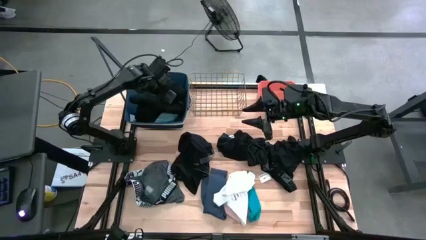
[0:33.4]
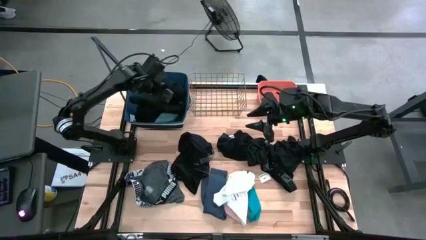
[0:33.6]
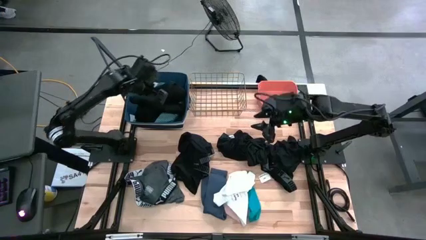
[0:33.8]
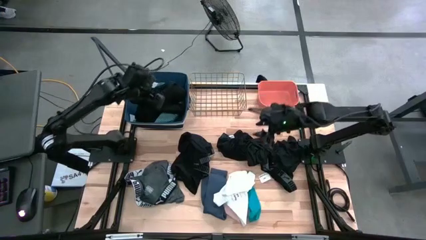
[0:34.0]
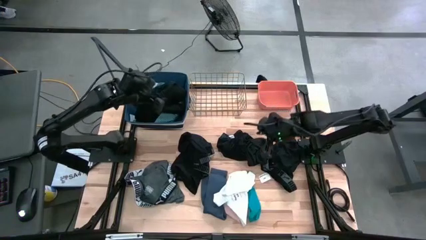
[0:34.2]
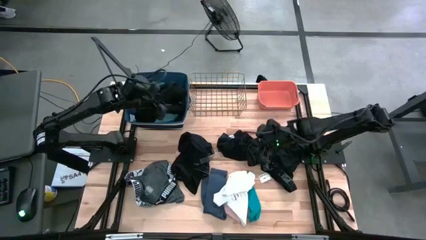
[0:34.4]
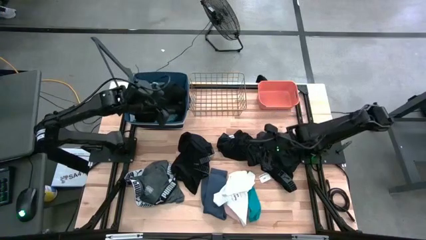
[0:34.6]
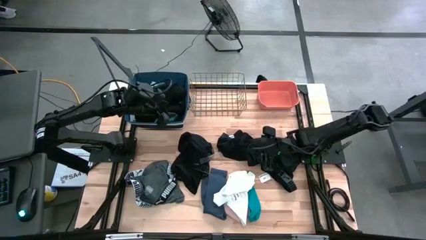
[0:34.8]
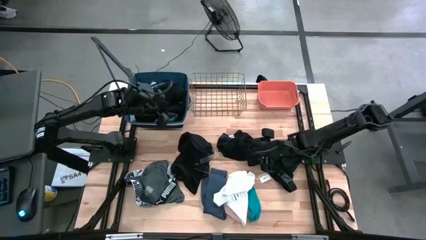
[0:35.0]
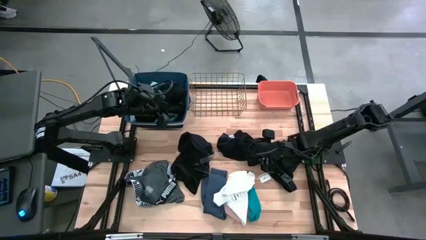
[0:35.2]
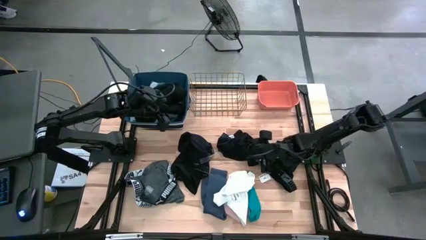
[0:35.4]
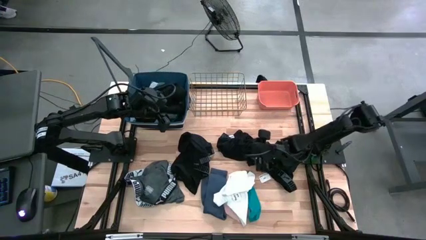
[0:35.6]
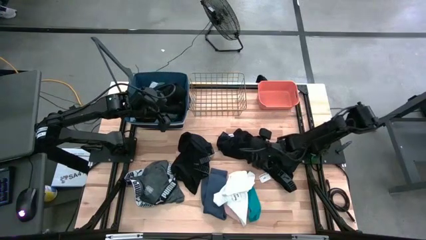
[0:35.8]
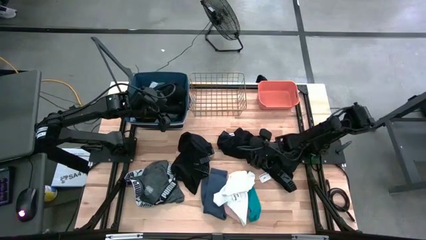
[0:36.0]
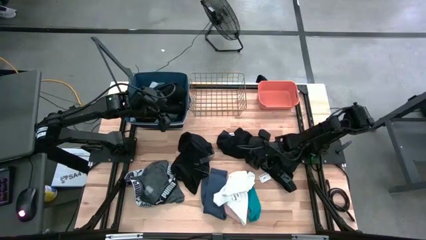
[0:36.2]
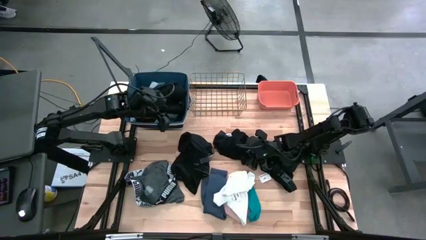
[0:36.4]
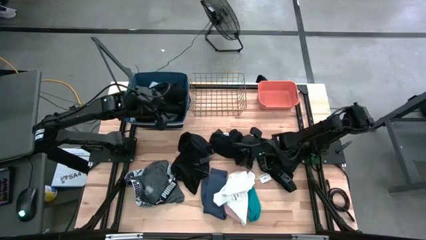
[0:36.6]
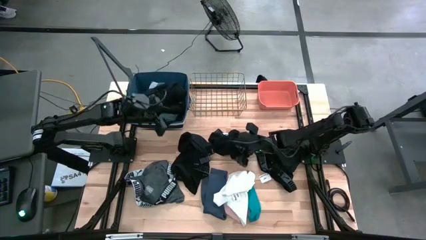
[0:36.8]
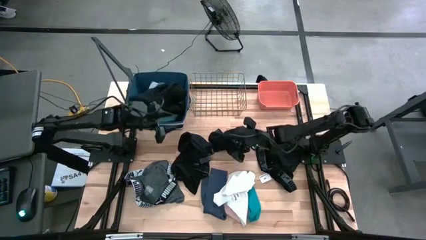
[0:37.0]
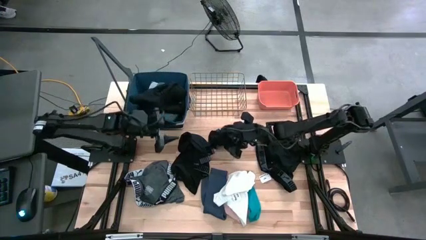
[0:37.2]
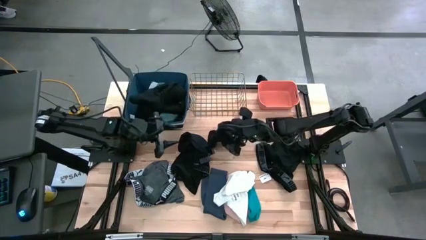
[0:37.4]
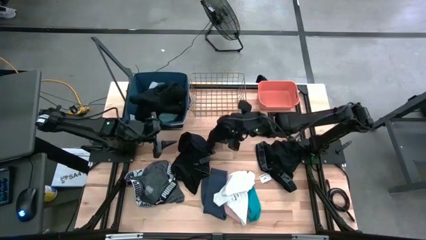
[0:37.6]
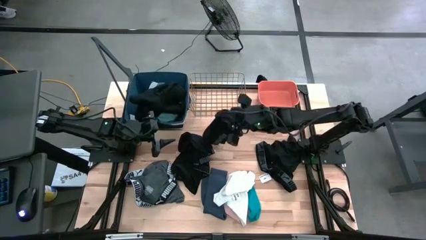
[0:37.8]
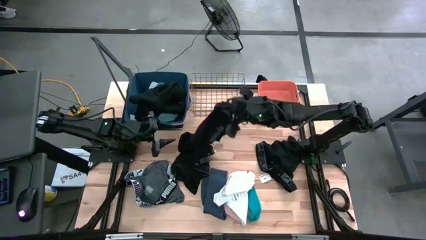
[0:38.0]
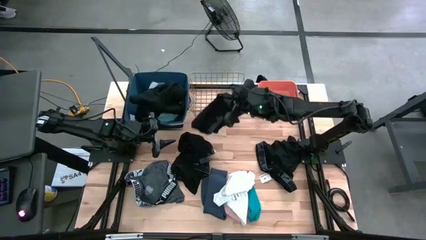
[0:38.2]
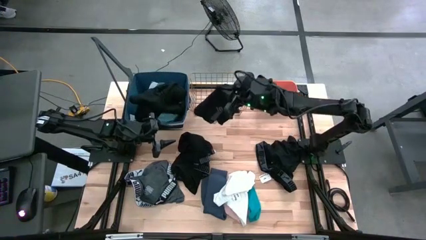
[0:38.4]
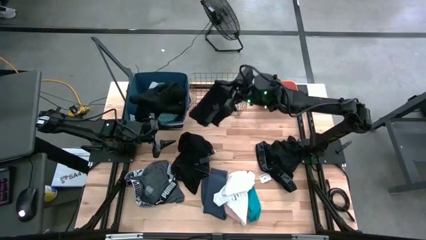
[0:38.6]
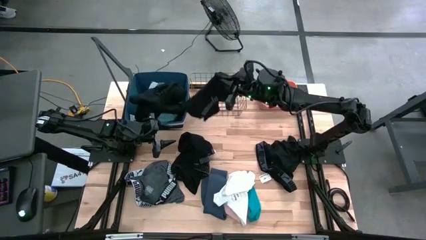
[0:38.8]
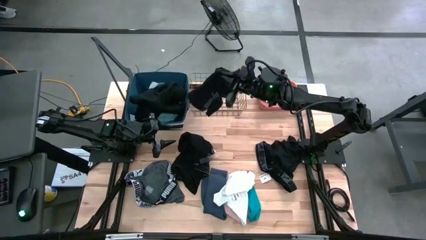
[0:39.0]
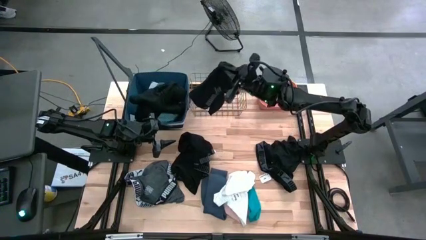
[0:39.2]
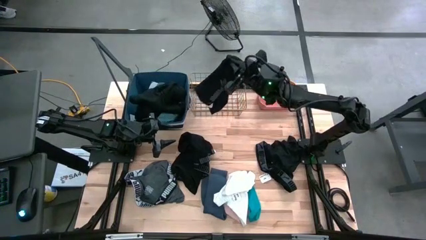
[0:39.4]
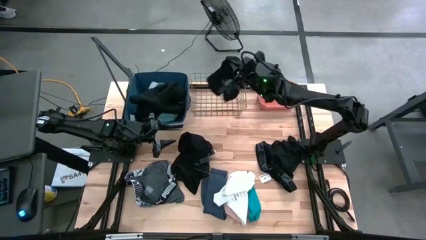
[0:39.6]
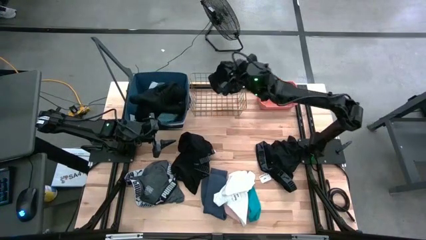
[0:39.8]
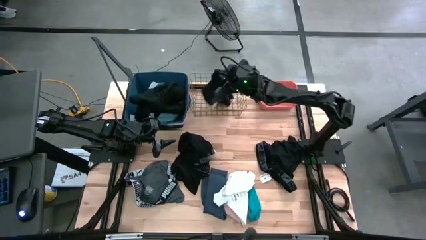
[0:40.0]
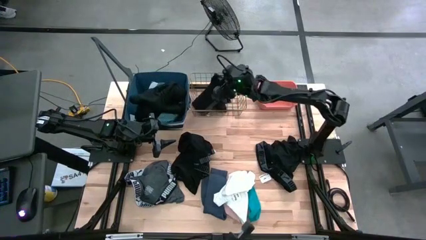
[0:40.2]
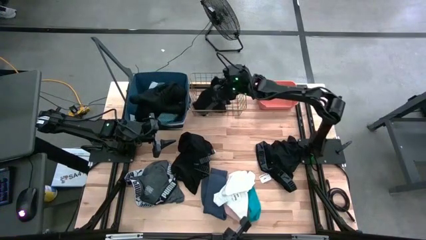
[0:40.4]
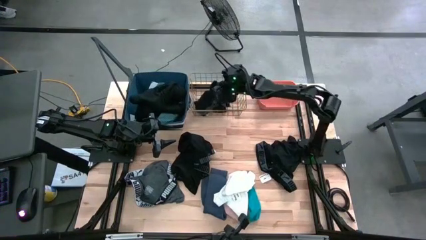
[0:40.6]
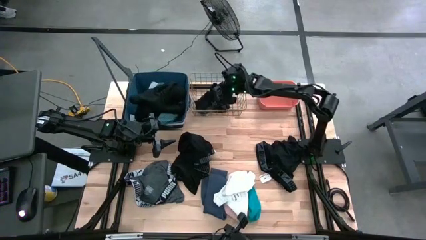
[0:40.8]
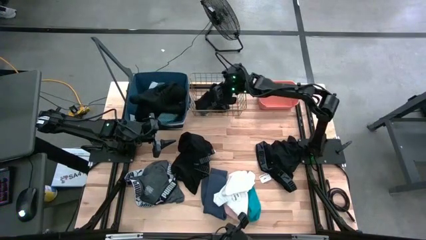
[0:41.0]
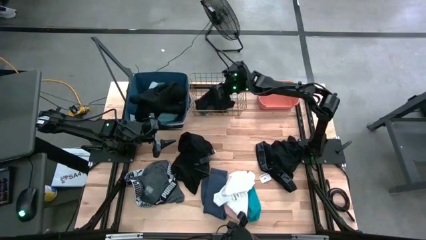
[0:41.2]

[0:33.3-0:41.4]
Task: Pick & Place Cloths
Put the black underwear into the wire basket

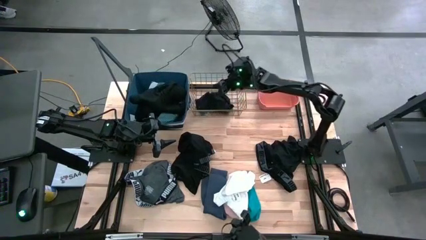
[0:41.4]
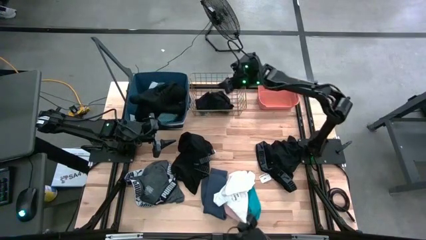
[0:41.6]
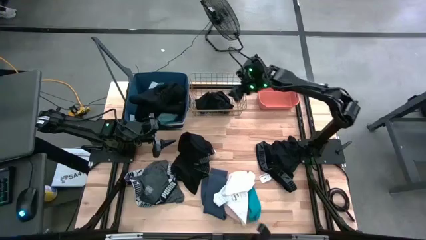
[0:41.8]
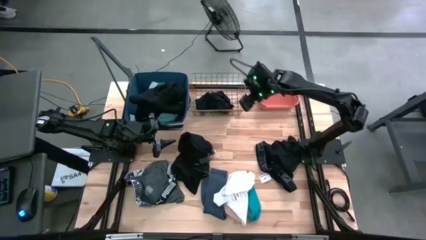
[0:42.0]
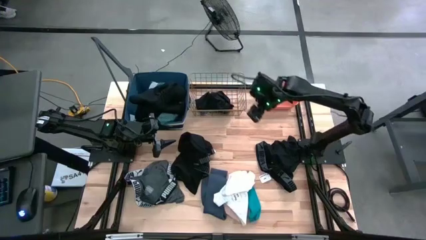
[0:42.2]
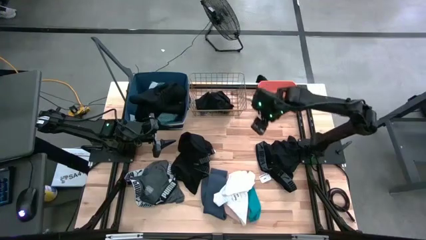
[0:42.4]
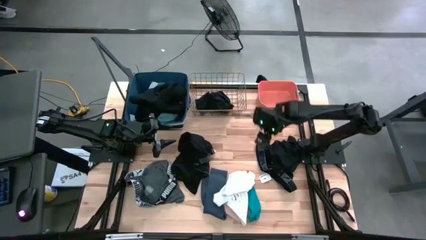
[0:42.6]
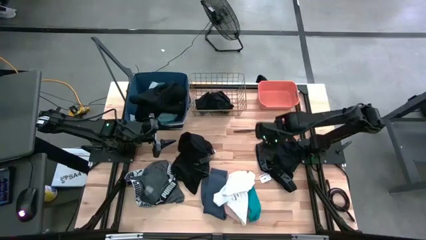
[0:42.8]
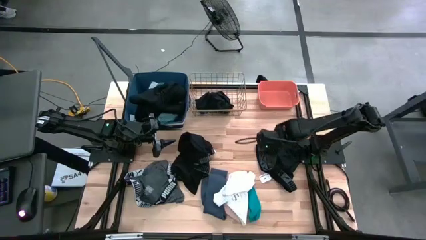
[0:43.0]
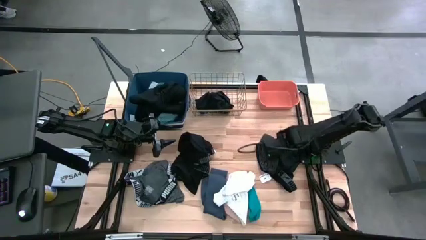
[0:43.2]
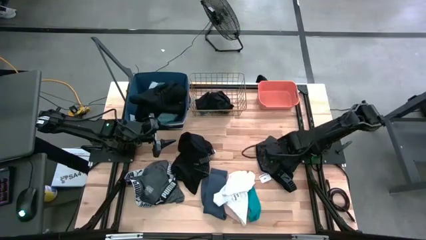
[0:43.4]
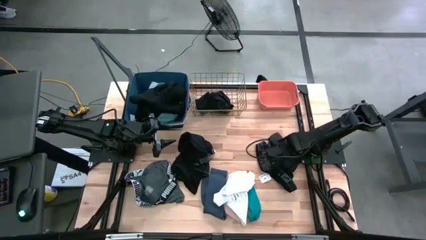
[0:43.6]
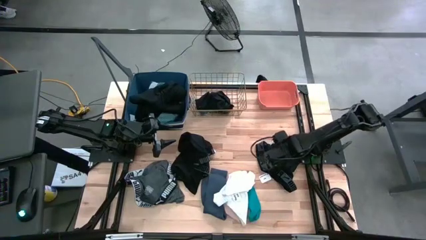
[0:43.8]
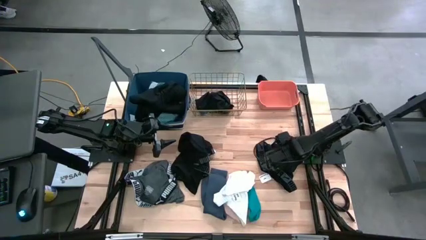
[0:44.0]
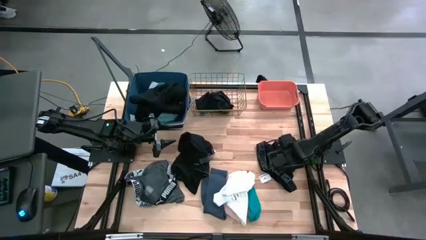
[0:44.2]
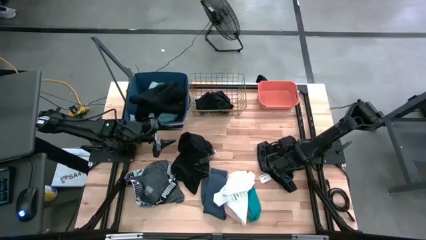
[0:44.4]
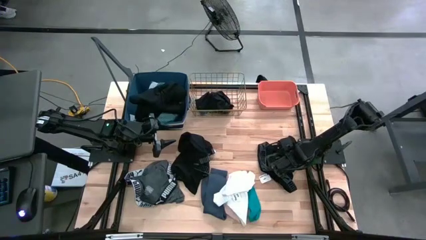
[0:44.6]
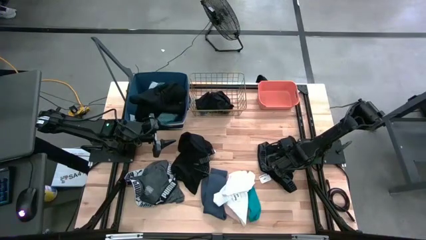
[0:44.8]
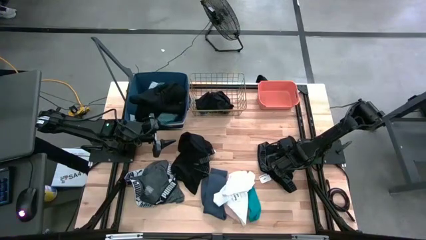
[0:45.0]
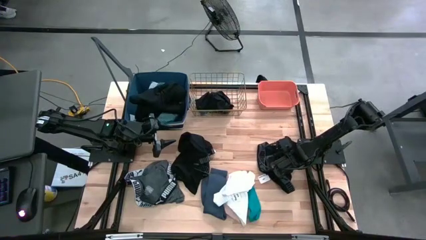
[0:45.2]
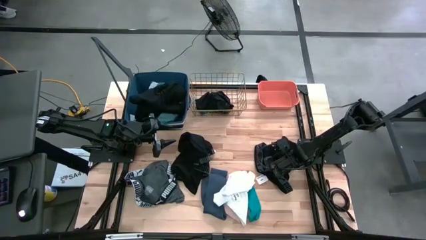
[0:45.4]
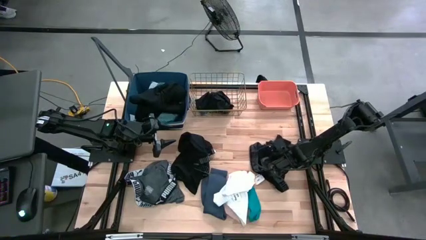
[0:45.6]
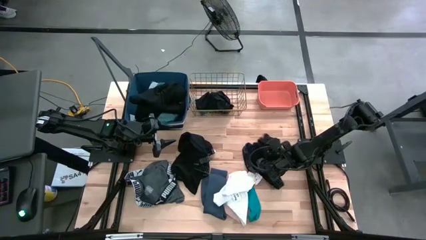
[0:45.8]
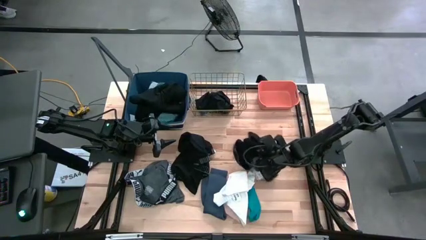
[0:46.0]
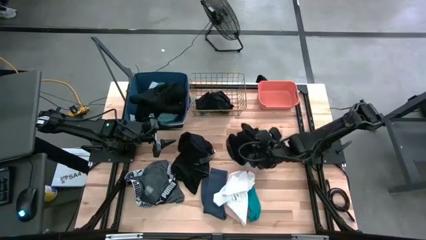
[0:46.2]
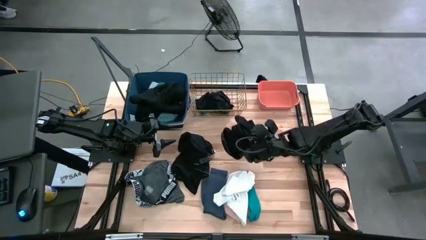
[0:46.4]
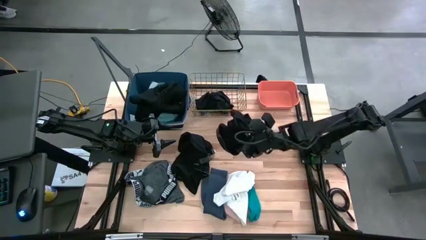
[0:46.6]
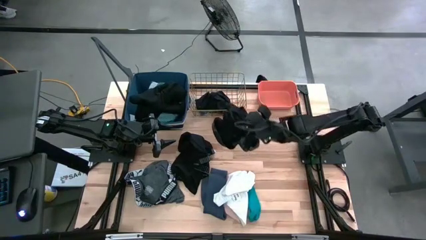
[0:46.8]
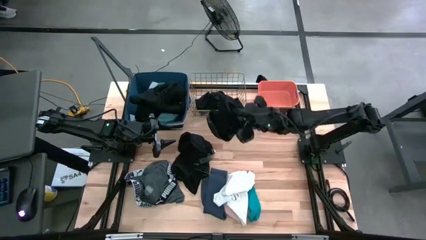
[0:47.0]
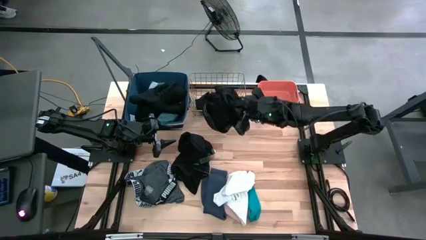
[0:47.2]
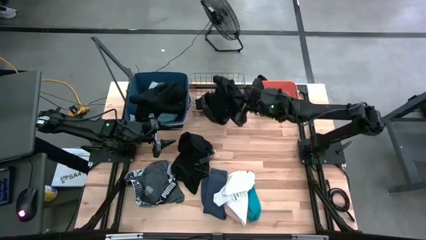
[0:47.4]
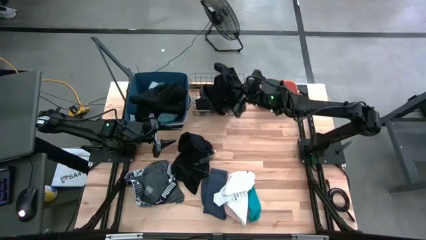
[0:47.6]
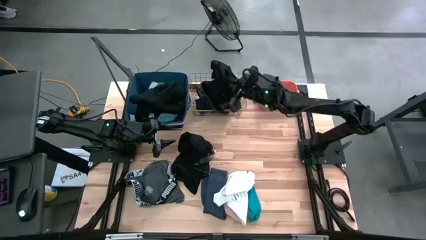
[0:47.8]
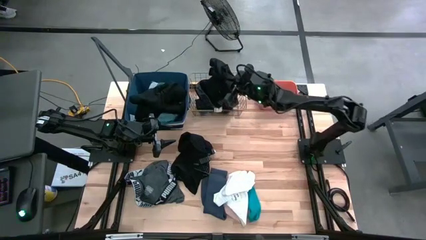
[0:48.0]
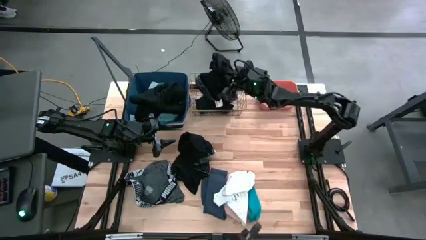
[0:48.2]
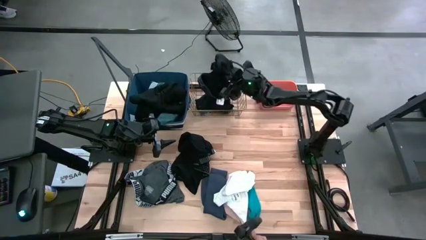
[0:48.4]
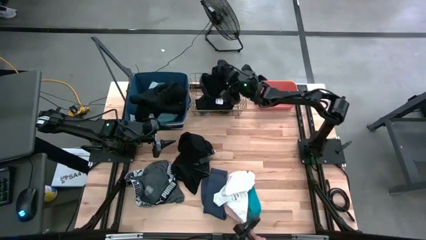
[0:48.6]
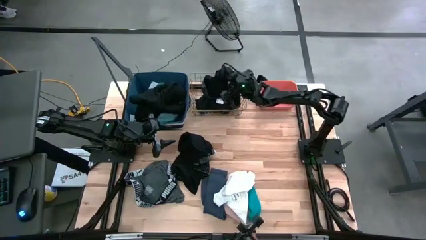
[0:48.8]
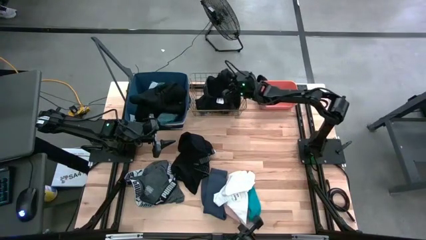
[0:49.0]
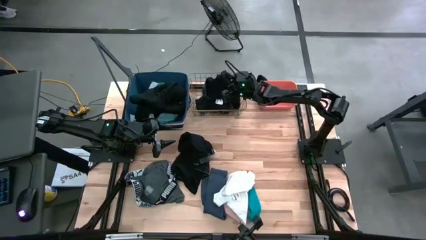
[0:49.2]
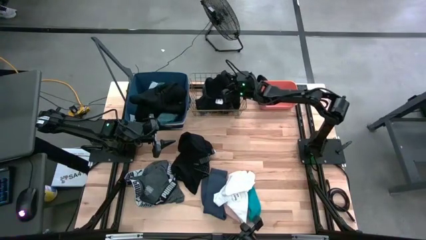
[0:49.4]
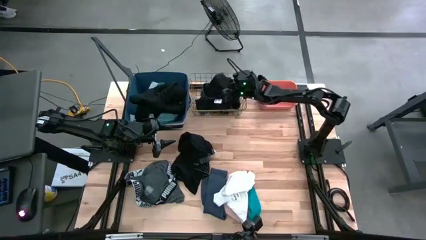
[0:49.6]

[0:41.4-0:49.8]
Put the black underwear into the wire basket
